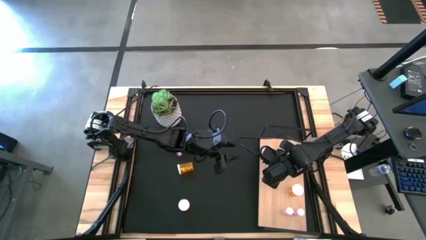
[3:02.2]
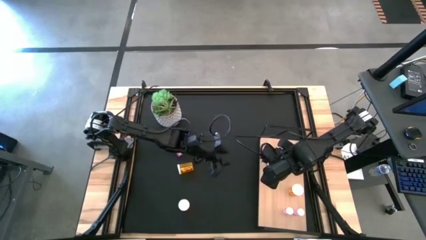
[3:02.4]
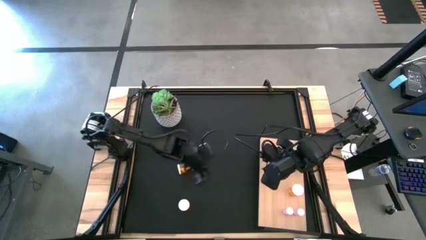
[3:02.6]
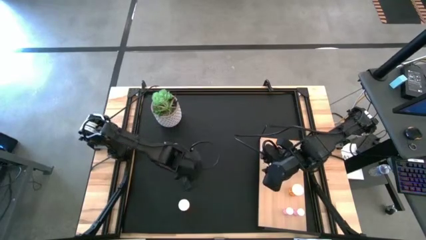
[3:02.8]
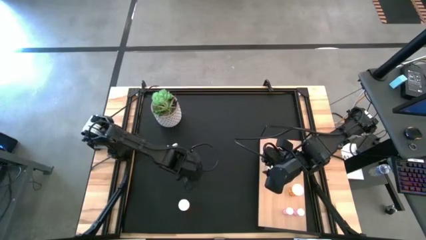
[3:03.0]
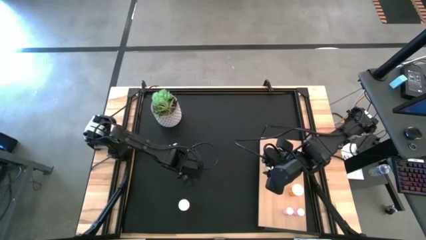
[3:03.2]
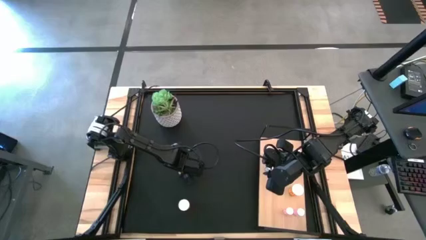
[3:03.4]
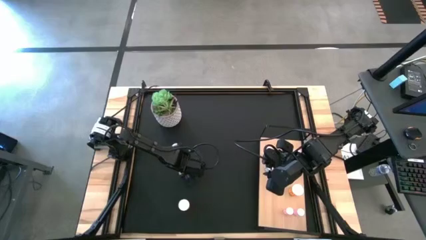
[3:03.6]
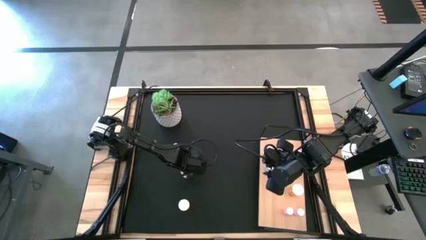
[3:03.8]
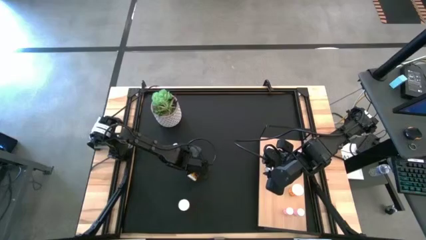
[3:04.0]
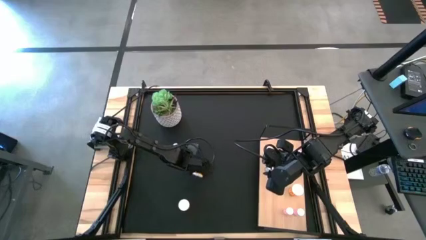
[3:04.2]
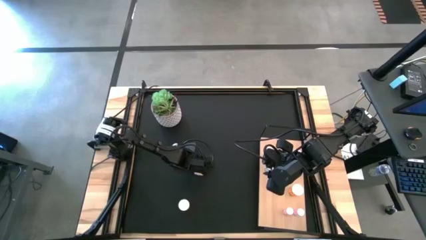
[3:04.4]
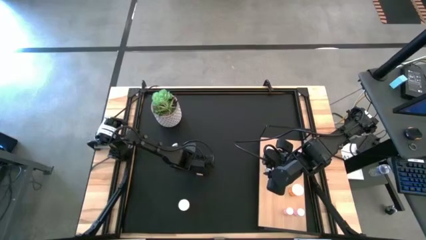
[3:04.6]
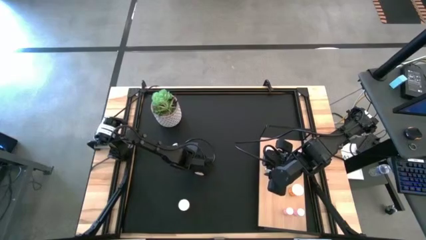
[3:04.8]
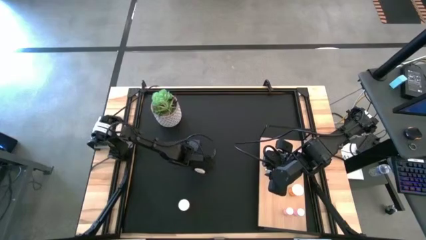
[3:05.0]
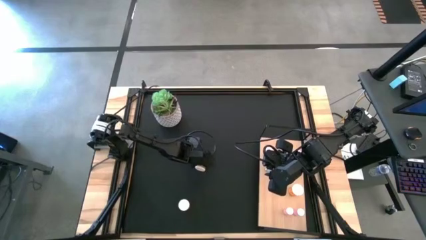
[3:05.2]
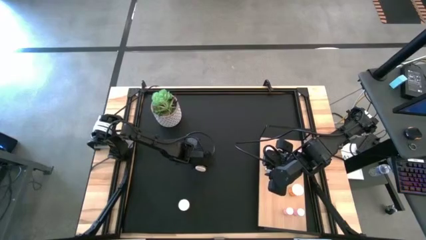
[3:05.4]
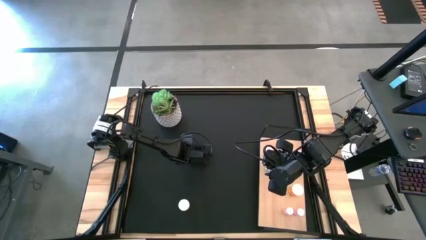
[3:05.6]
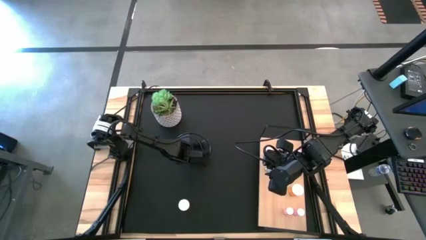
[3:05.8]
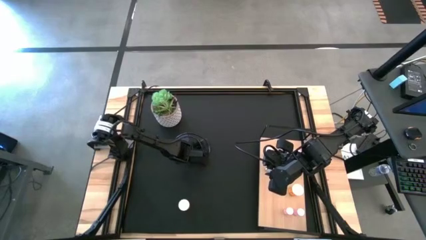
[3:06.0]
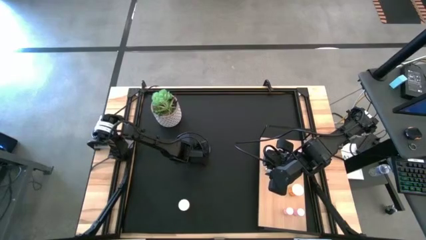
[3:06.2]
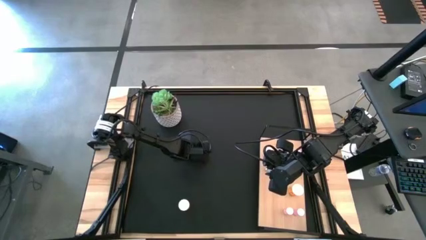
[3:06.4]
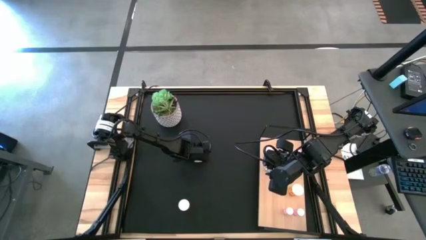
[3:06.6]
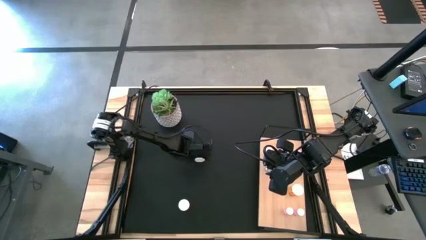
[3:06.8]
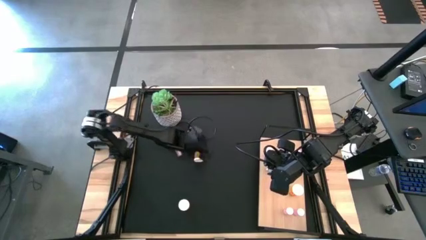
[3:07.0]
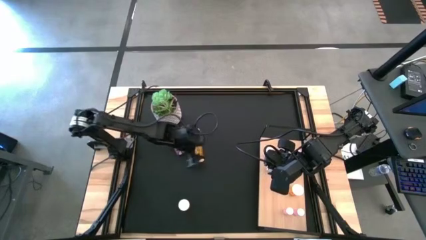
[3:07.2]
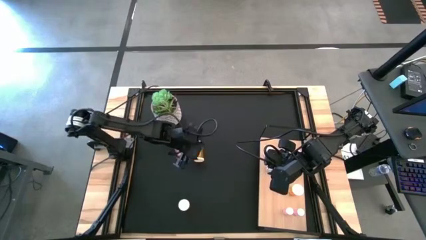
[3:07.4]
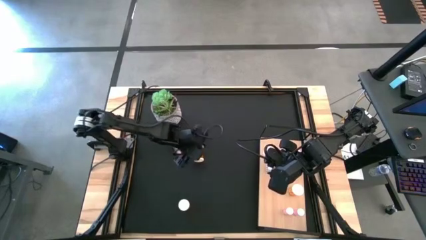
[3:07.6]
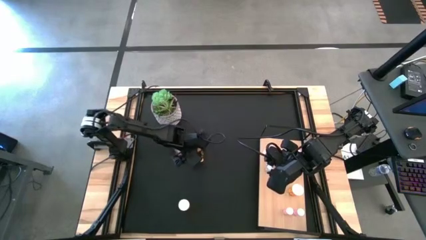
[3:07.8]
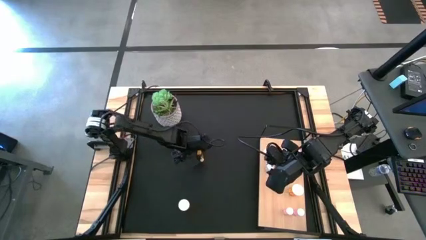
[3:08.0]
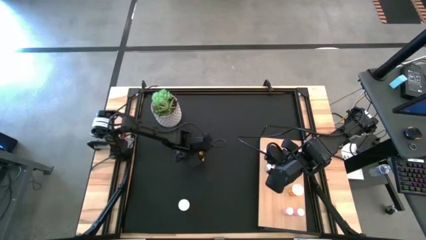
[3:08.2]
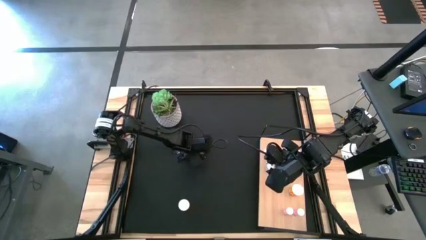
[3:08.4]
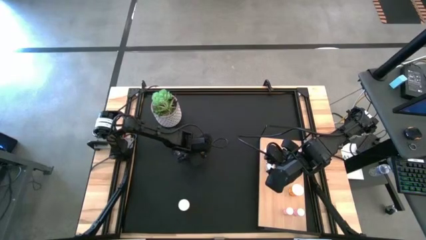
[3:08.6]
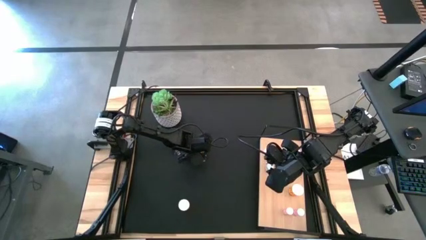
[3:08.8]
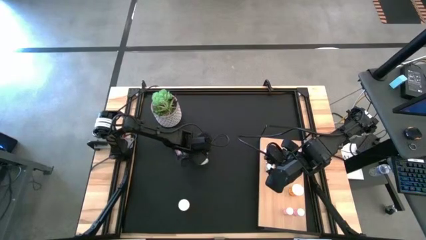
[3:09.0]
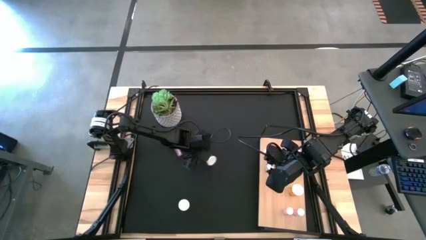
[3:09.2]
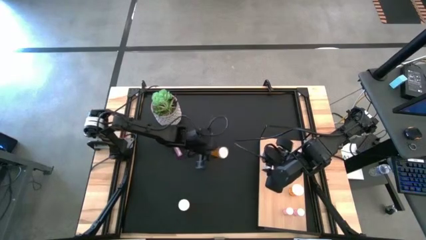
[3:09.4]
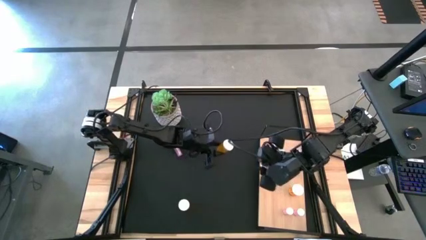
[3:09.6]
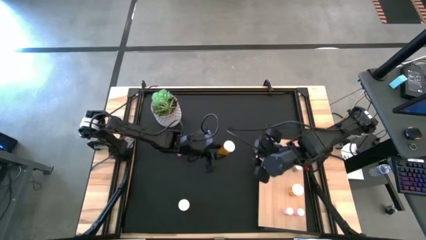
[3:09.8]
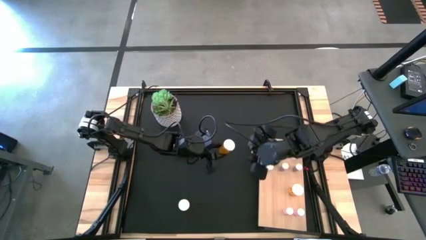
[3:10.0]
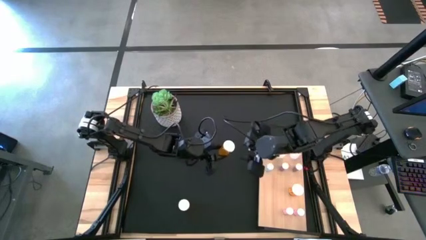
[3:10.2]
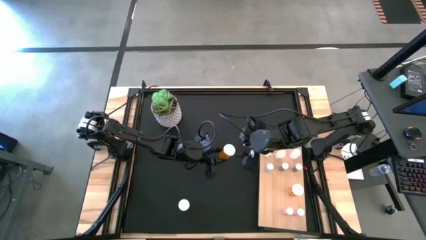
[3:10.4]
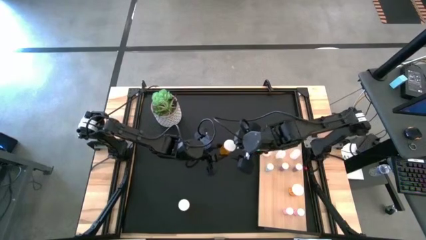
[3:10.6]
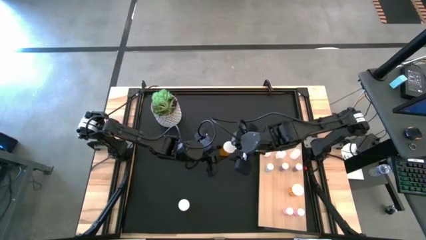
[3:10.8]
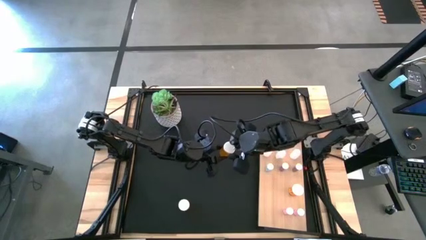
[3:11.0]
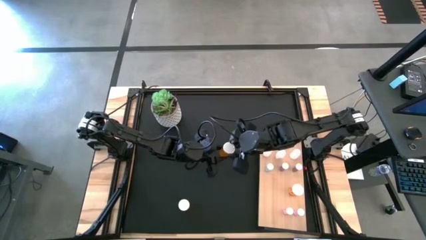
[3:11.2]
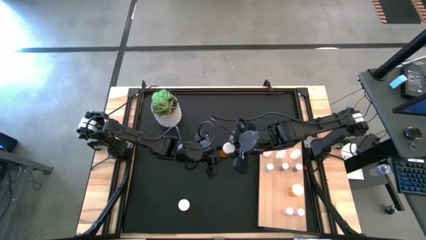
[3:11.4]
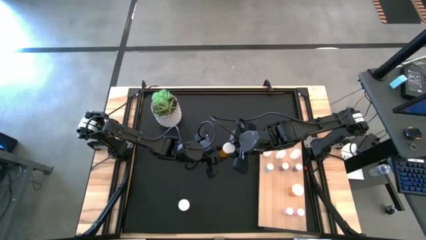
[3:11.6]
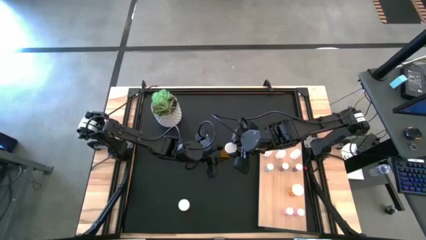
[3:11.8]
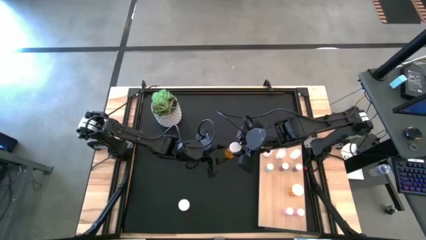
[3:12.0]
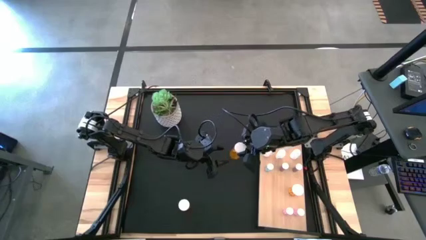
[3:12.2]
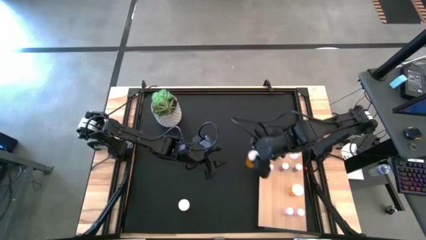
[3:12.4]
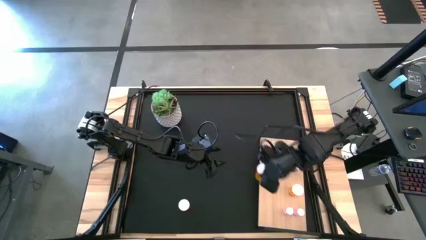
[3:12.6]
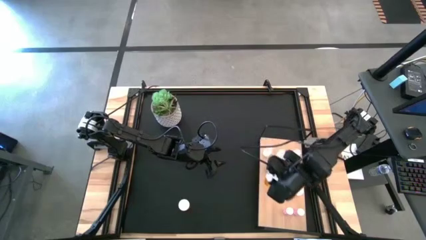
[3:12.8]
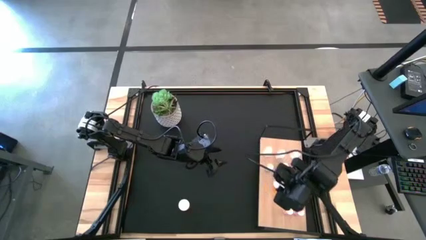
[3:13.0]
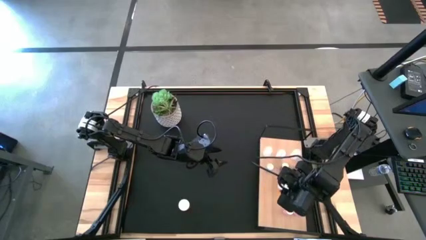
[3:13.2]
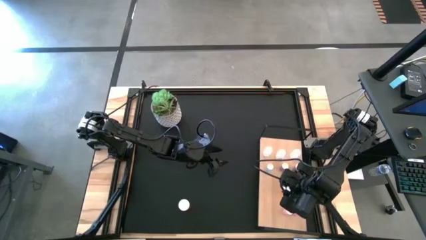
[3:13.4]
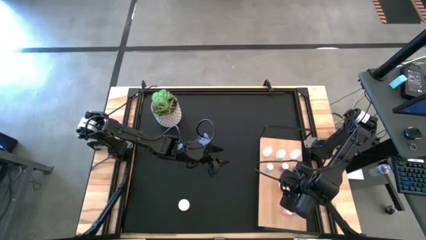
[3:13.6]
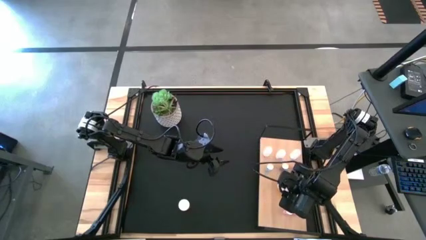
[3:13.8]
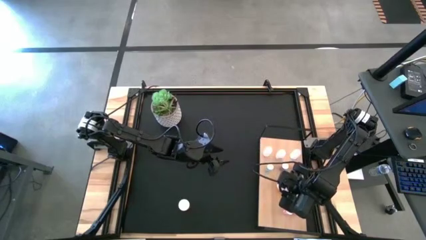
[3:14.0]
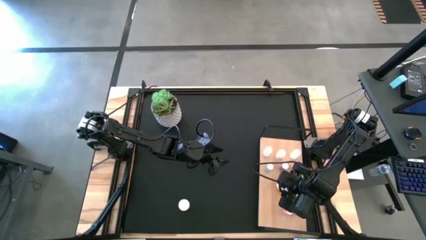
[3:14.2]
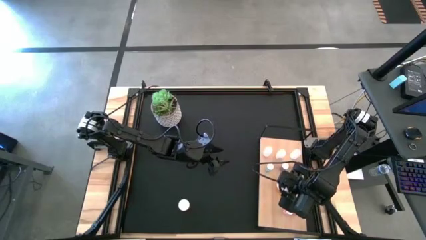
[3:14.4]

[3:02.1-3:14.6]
Task: Pick and place medicine bottles onto shelf by color
Put the top orange pill bottle on the shelf aligned with the other orange pill bottle

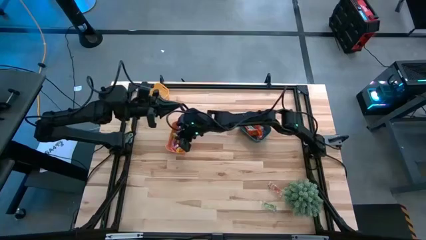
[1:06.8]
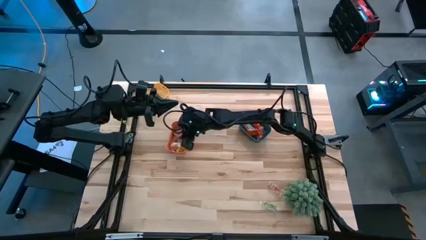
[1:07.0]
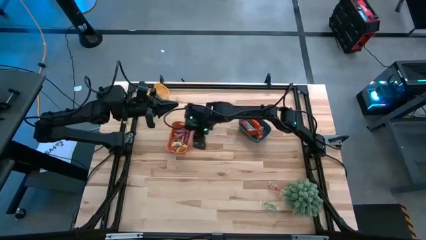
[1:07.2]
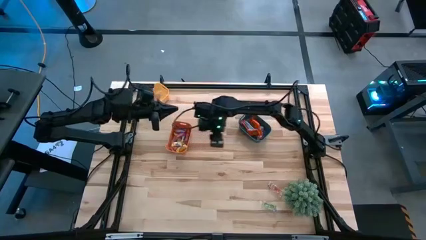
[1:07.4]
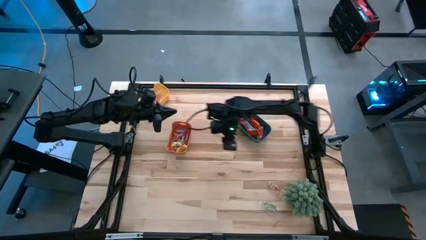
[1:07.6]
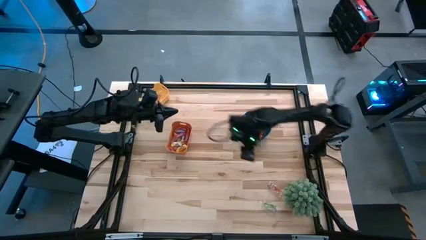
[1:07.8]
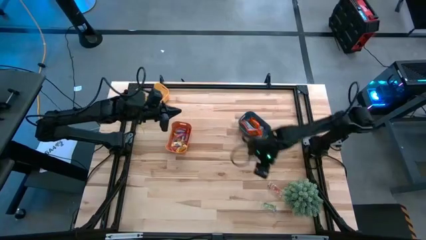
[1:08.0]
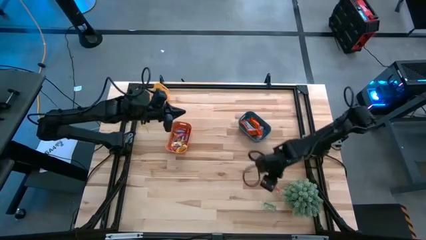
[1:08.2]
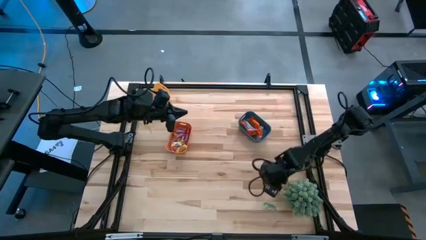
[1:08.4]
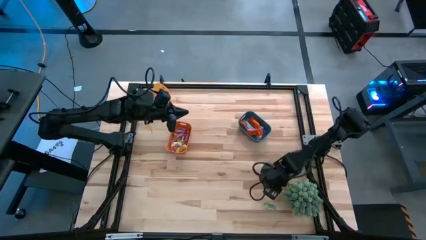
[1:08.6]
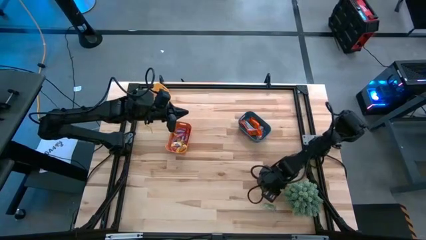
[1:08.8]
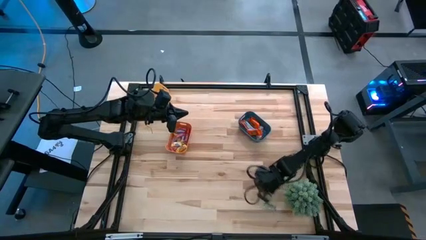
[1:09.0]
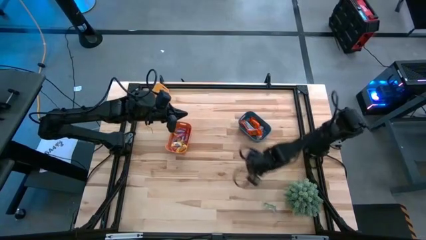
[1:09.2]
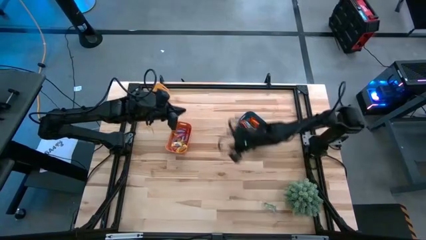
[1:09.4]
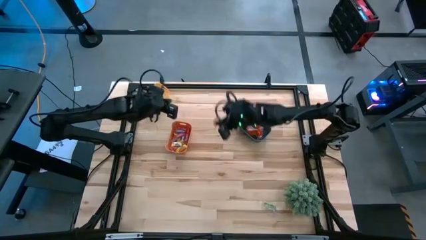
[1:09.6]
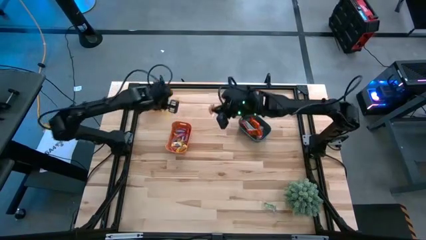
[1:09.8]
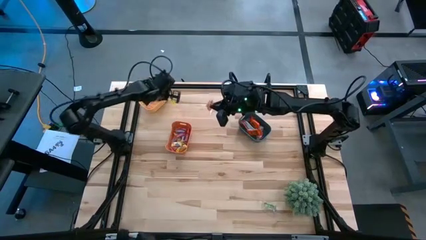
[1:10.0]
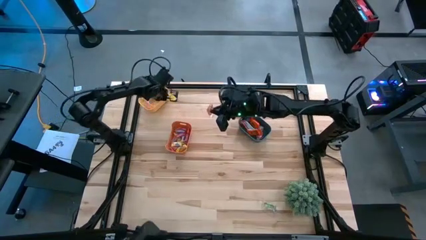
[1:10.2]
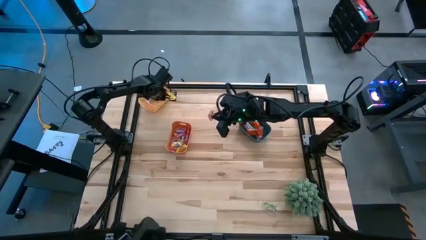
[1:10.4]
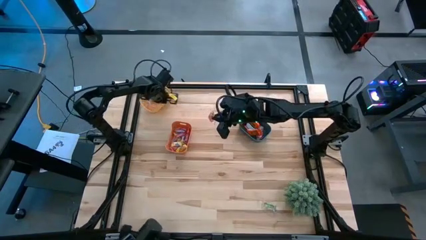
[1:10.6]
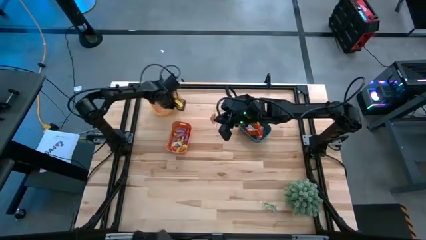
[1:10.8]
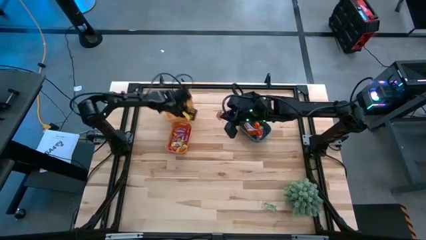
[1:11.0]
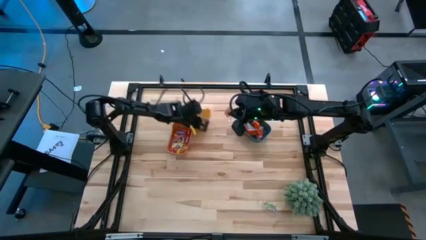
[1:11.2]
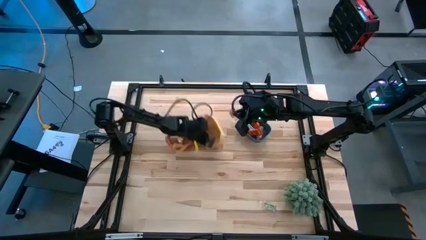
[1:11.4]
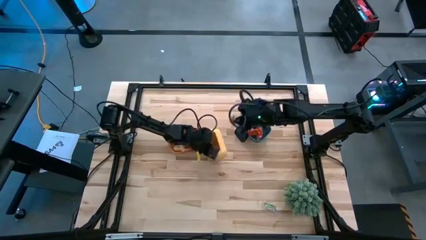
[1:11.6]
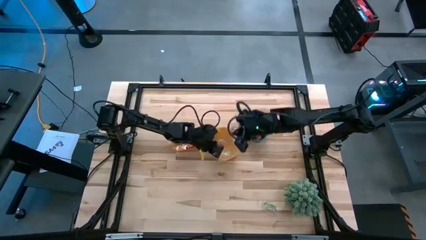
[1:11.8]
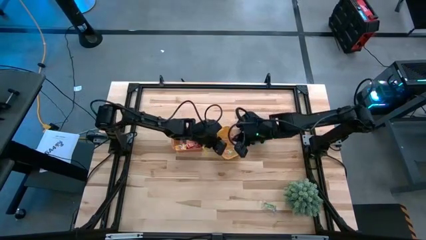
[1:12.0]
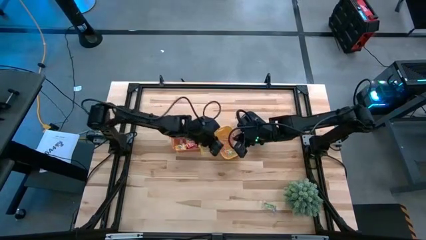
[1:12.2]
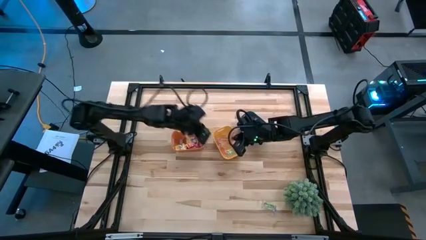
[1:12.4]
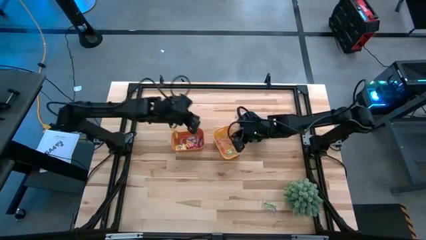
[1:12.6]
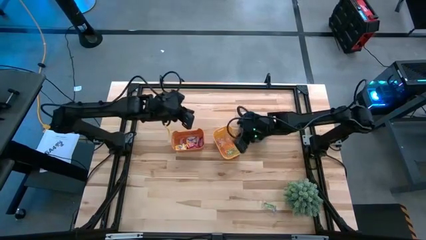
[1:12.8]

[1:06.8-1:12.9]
Task: Sort candy
Put the orange gummy into the yellow bin
